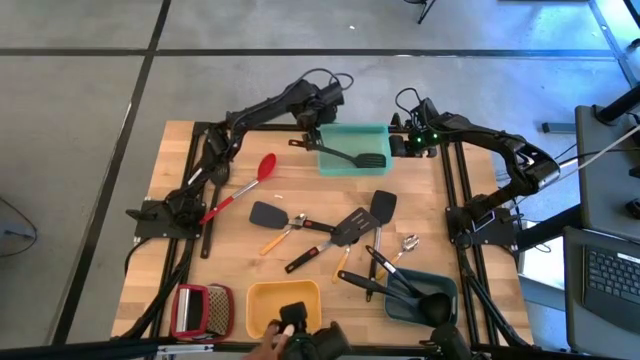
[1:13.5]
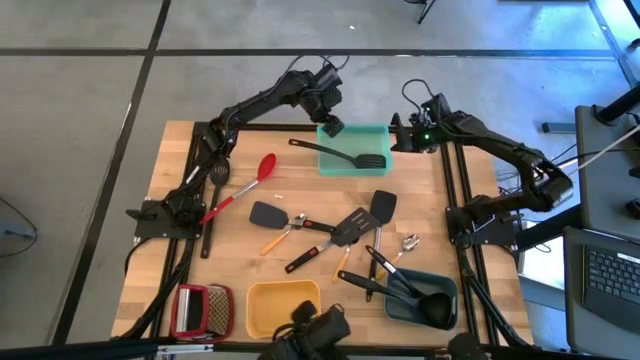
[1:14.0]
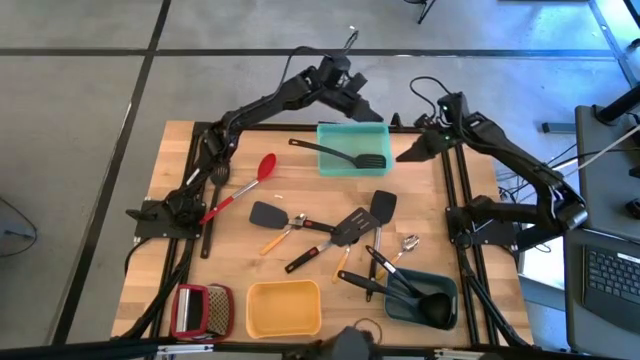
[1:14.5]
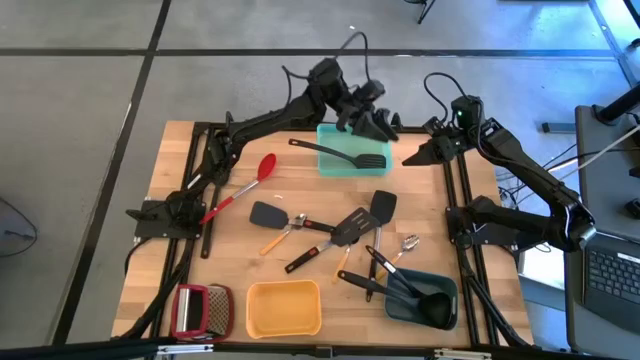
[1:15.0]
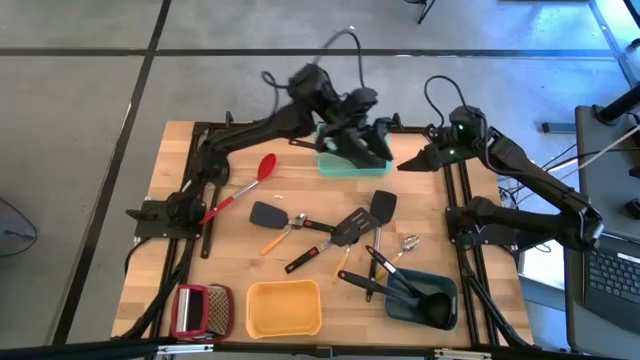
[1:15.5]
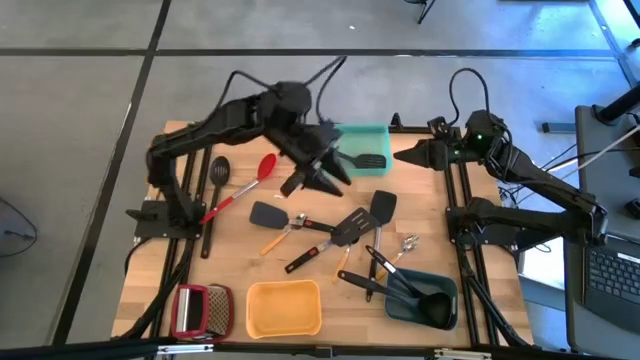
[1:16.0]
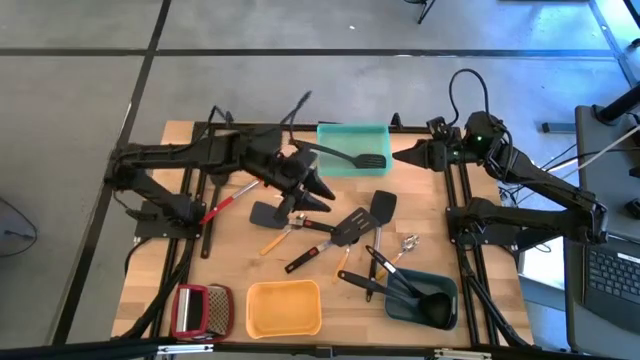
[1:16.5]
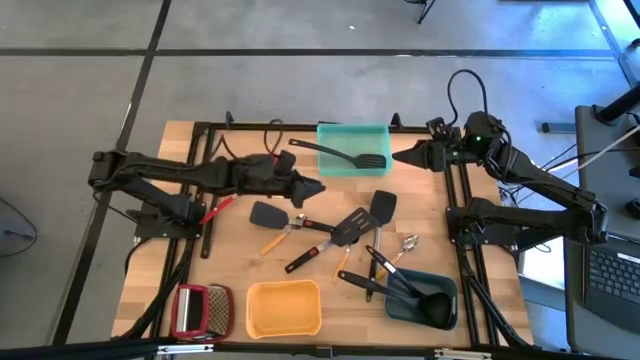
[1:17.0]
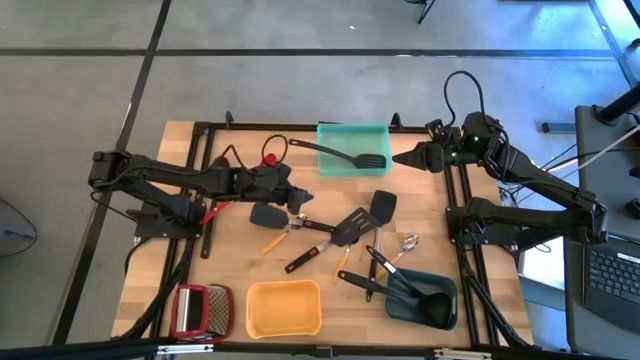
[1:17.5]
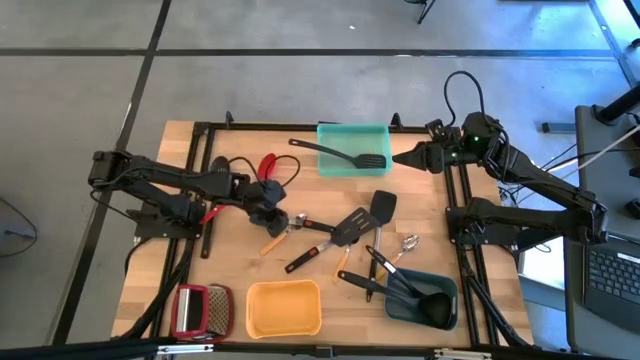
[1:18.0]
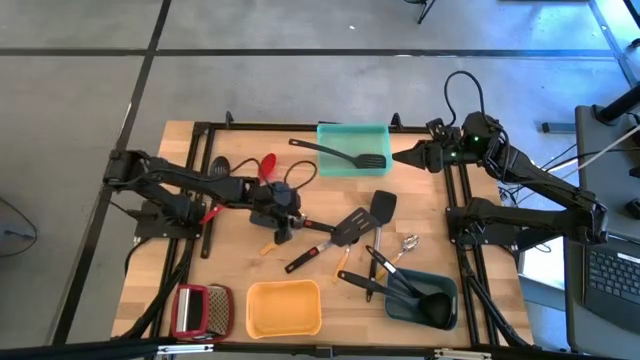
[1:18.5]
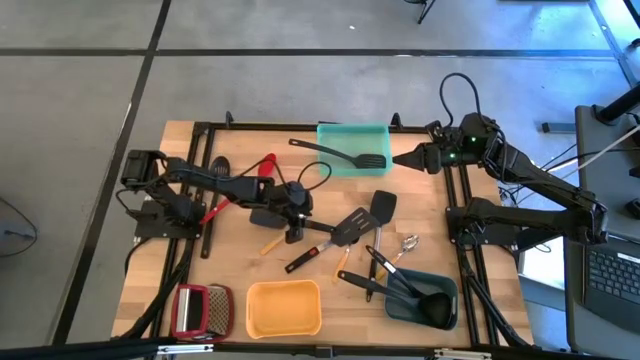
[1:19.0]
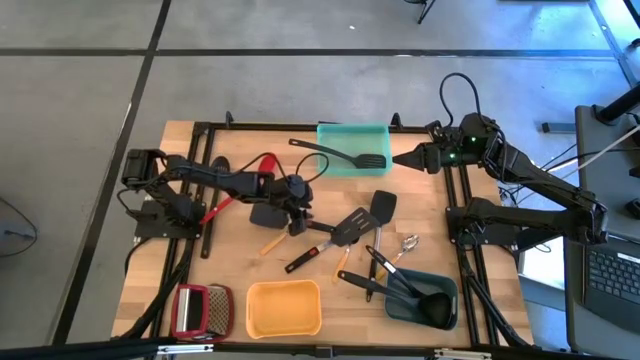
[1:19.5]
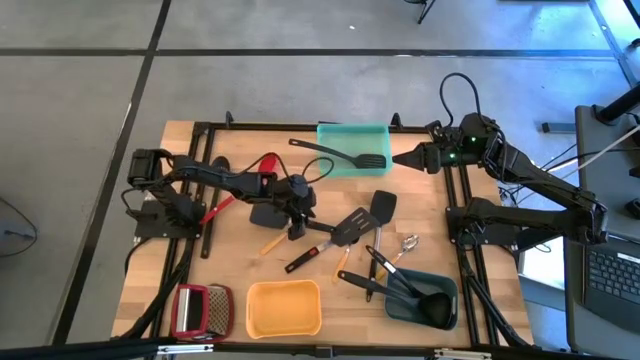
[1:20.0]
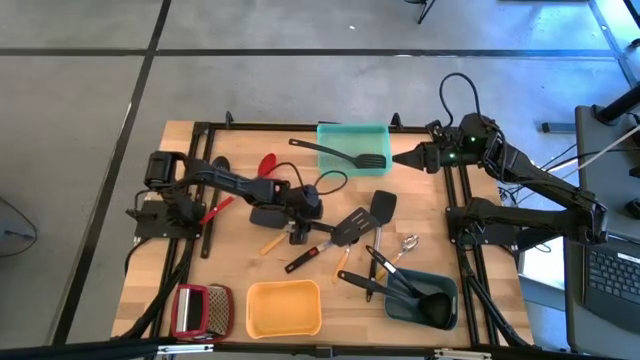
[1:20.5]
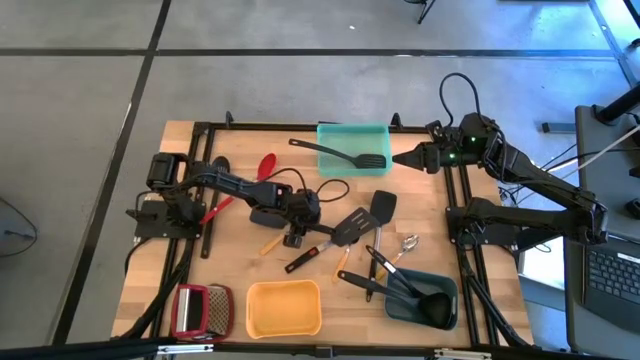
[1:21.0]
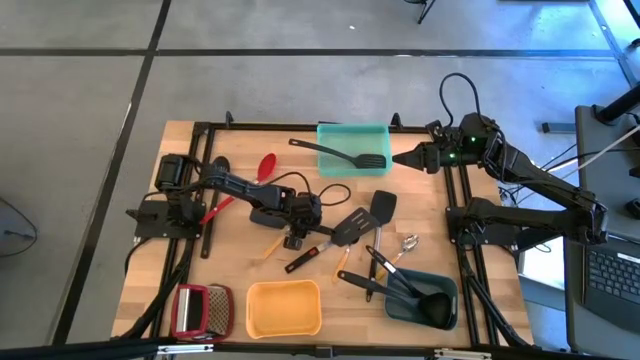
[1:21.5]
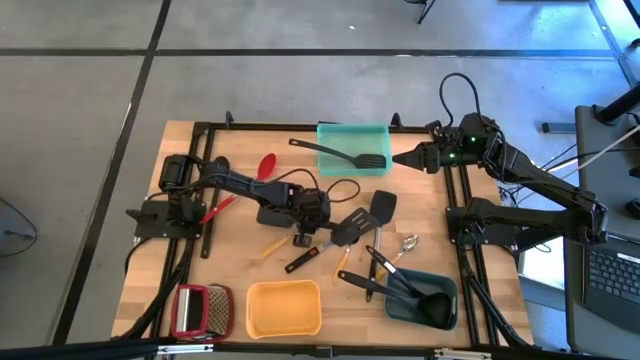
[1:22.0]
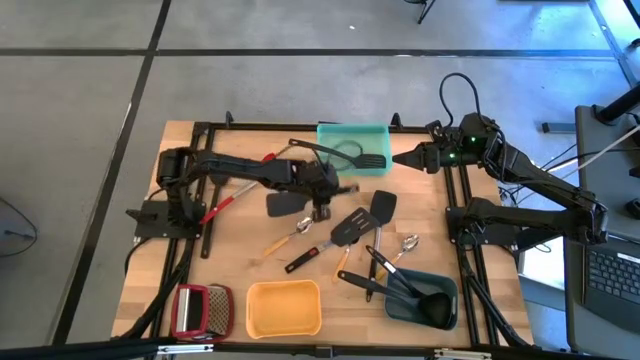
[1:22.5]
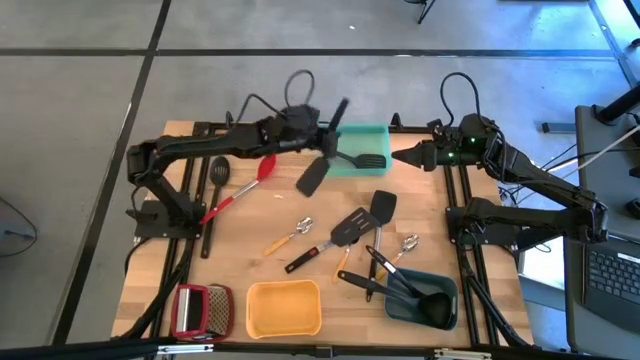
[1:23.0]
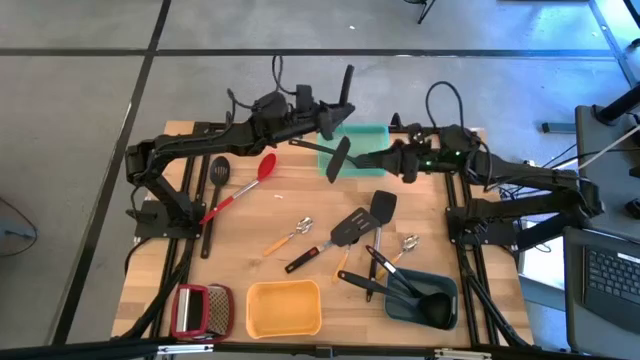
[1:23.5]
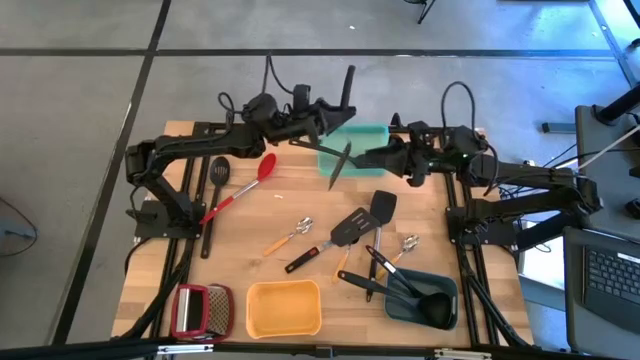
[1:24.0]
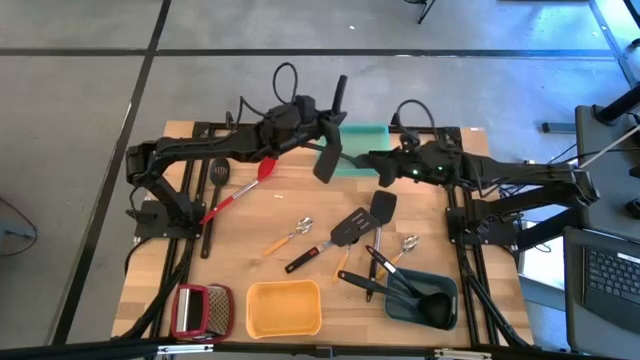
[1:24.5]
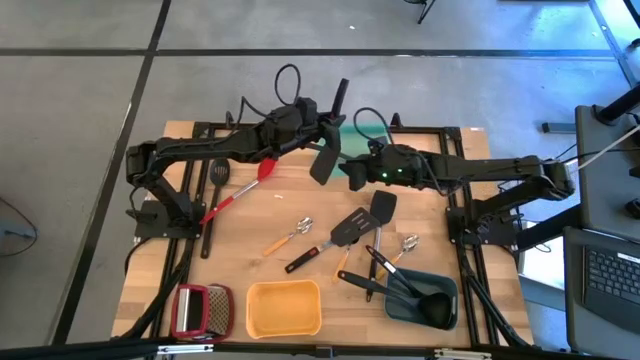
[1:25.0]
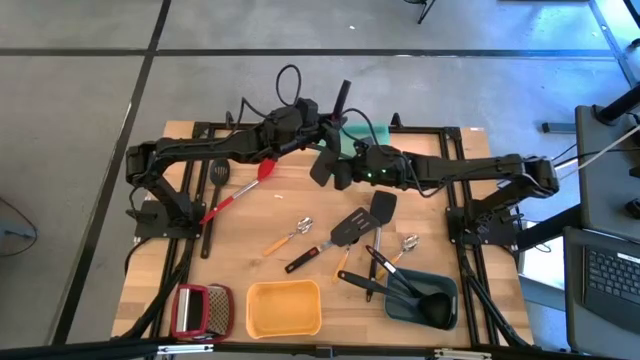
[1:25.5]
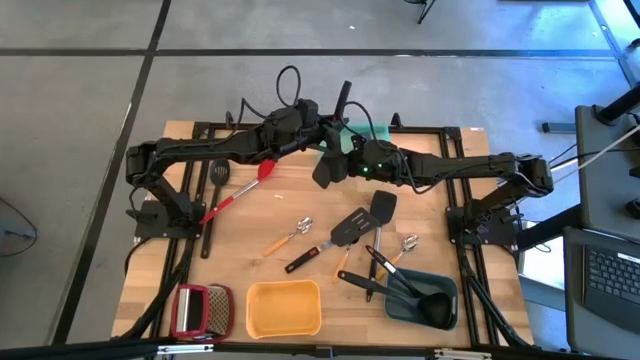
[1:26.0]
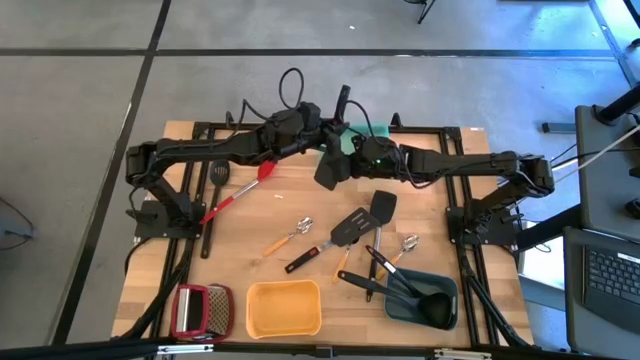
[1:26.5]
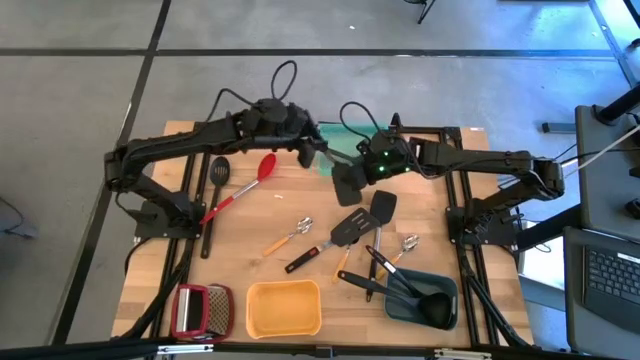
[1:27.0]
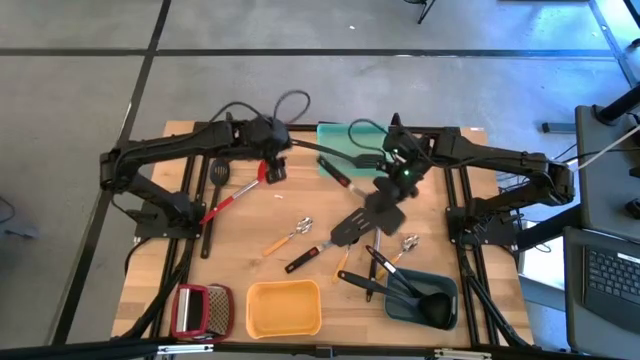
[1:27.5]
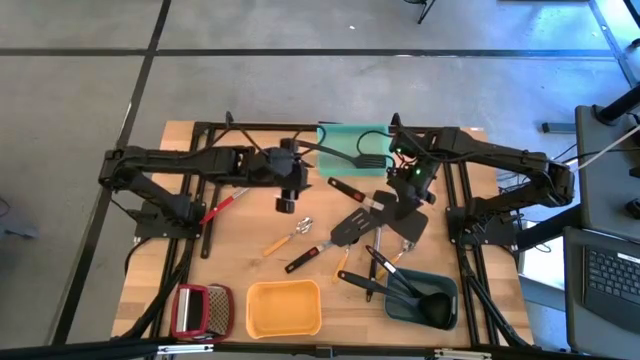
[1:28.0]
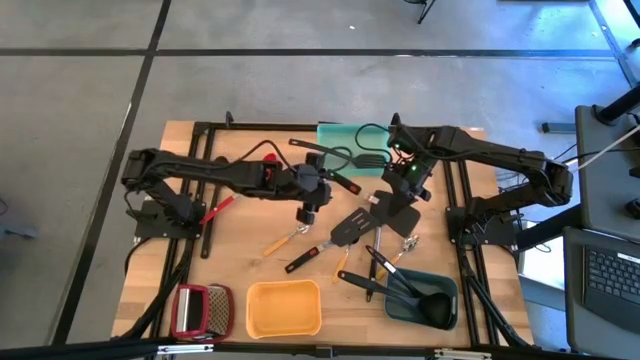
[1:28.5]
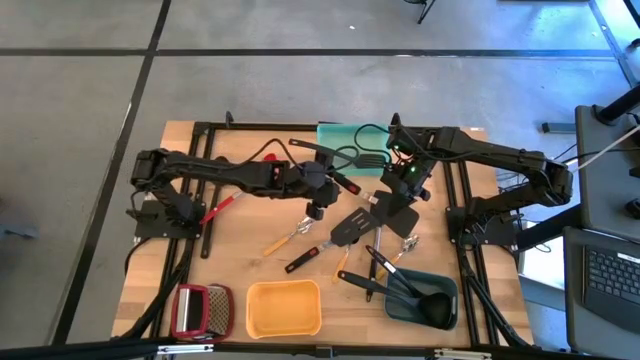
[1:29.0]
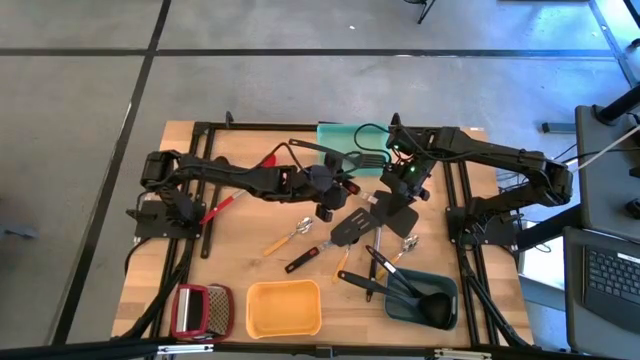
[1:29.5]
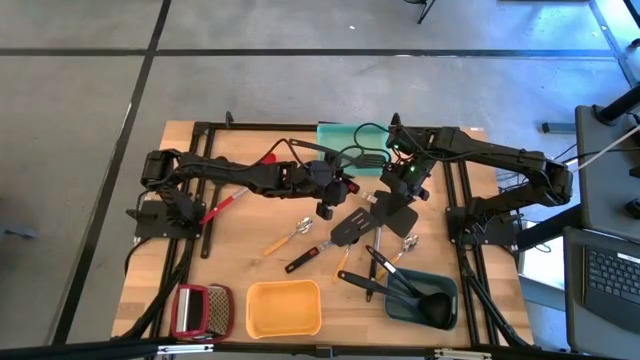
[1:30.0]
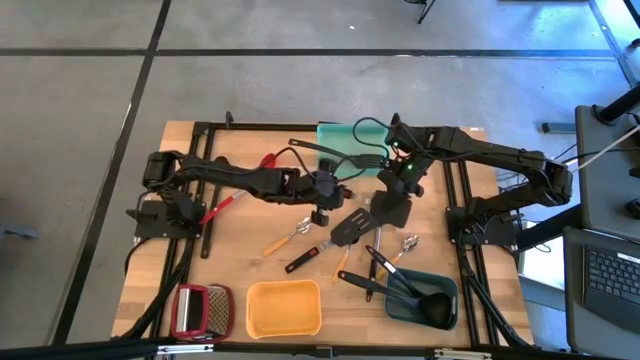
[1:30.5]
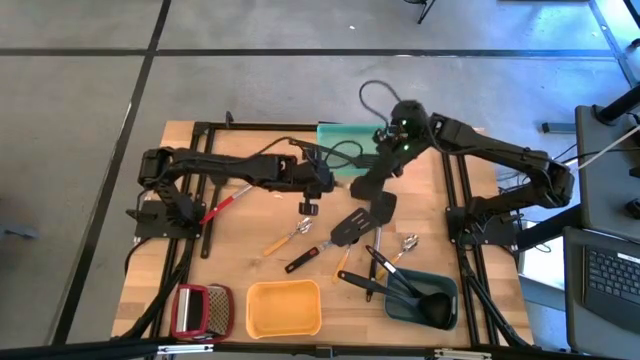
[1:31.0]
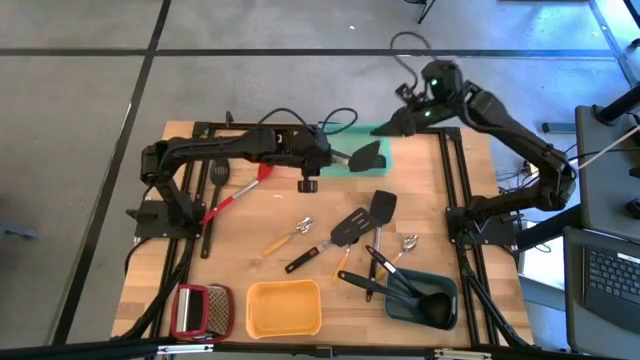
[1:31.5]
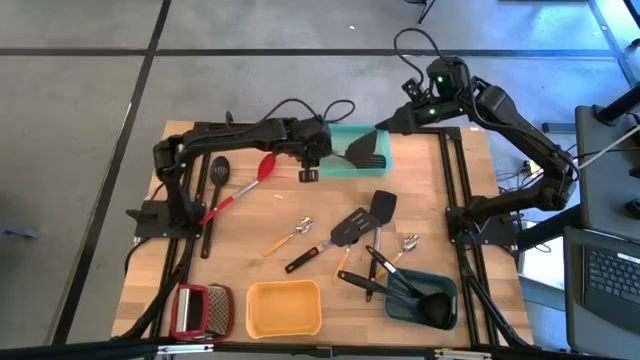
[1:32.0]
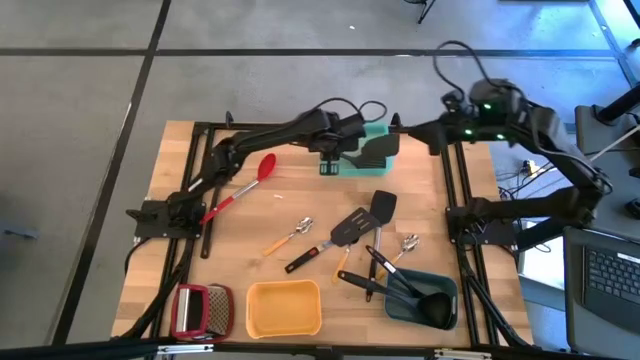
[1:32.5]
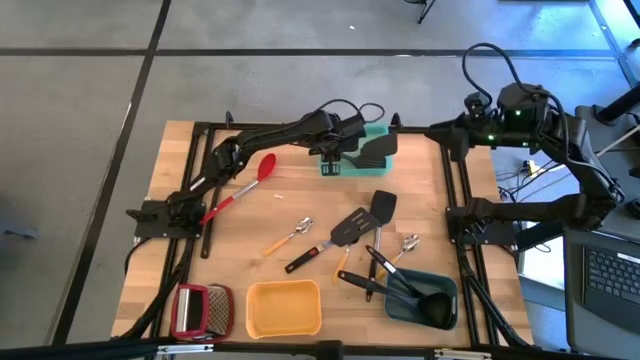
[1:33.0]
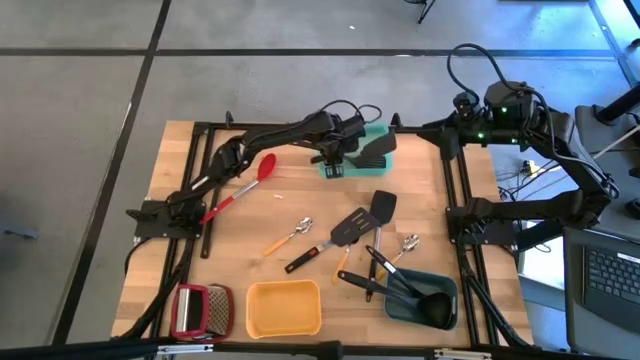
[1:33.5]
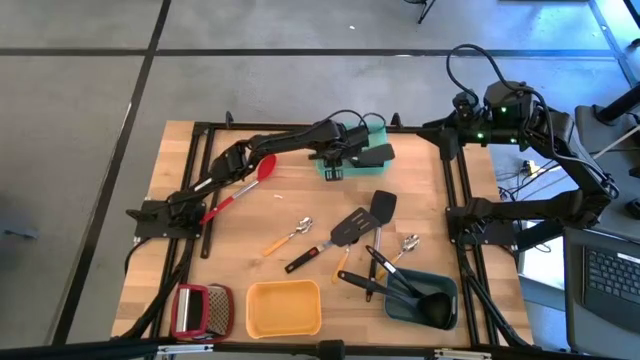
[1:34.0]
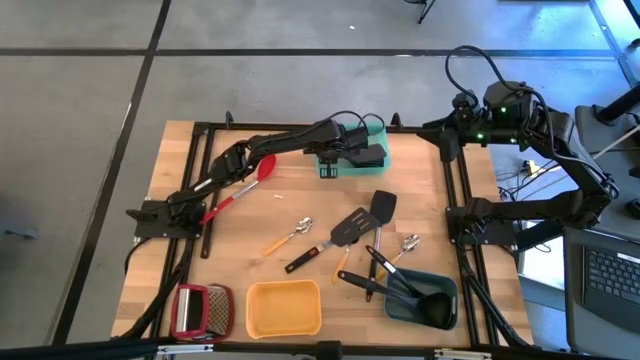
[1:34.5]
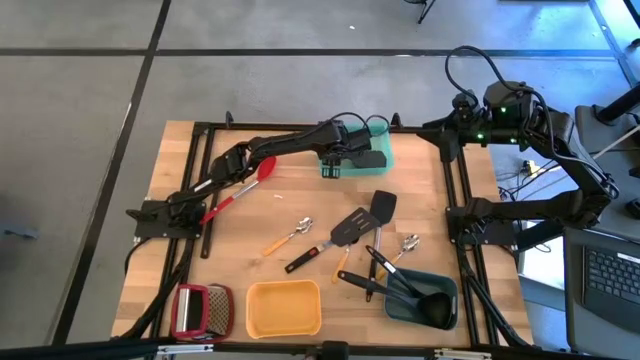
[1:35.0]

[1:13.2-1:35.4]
Task: Pick & Place Kitchen Items
Put the black spatula into the green bin
